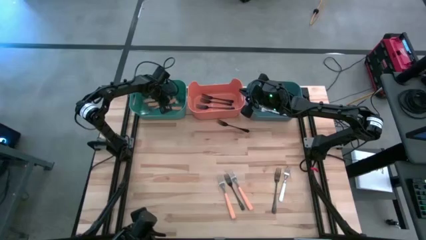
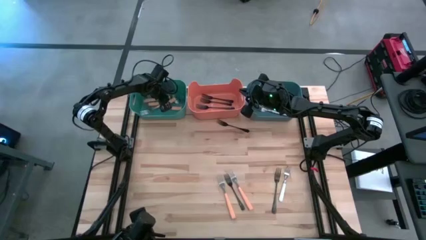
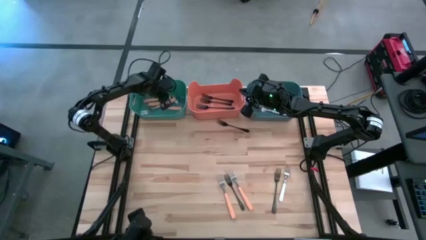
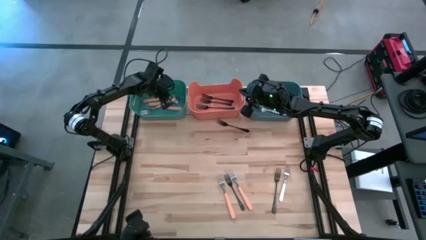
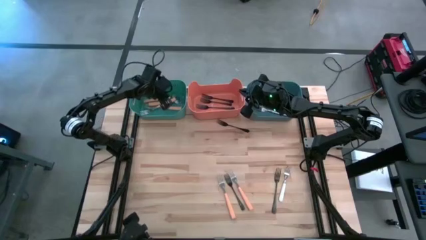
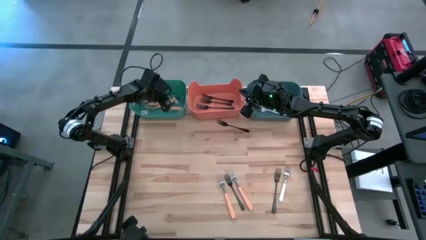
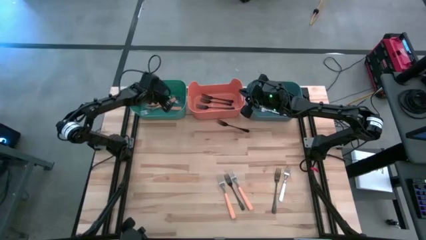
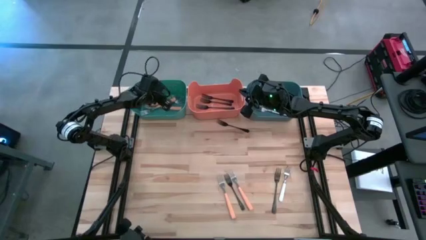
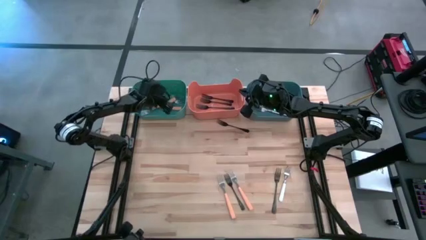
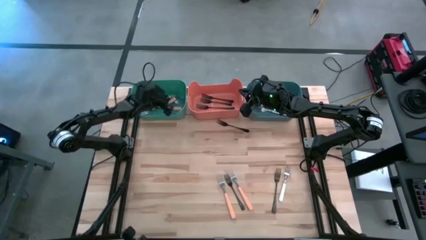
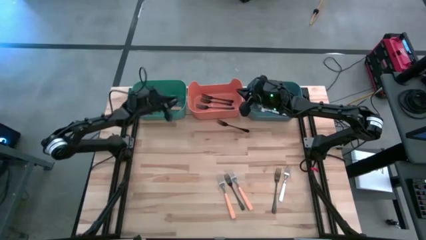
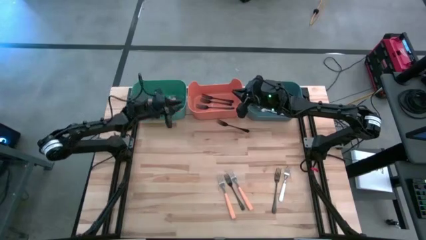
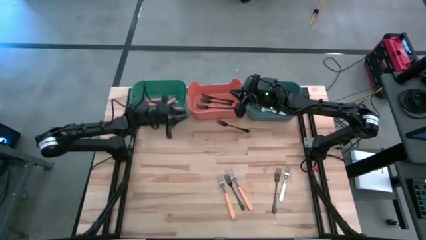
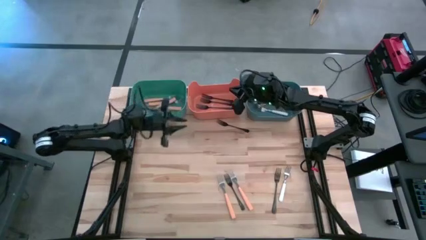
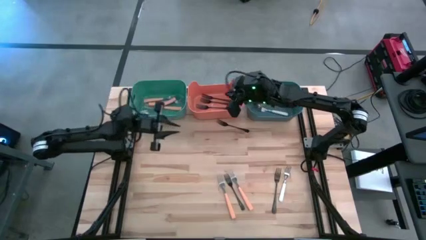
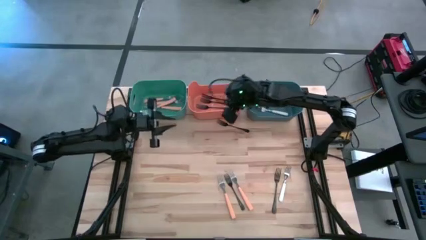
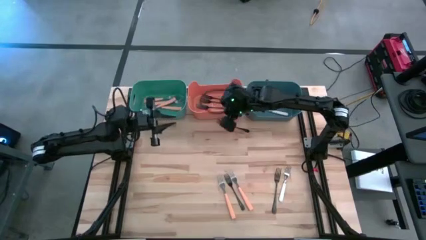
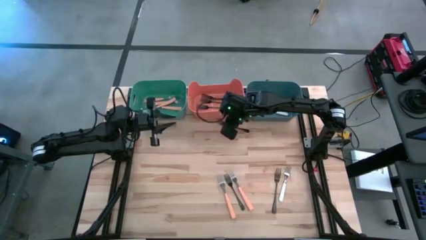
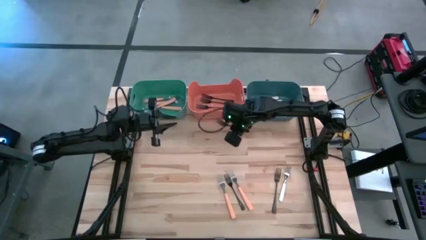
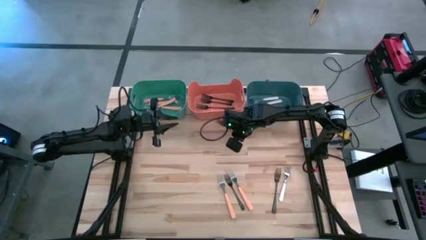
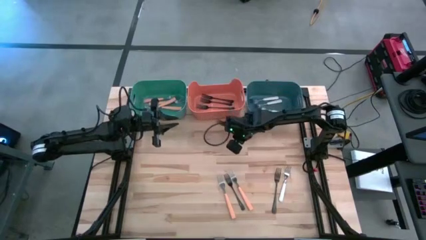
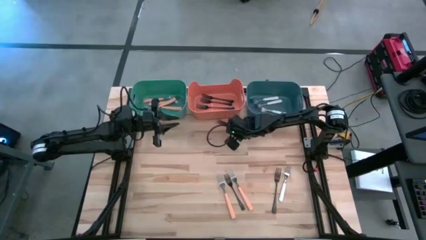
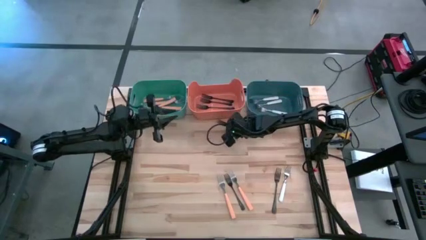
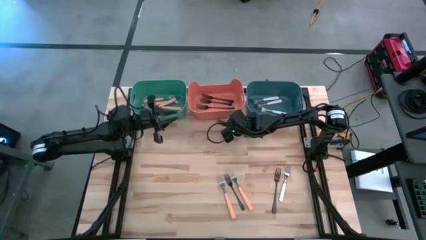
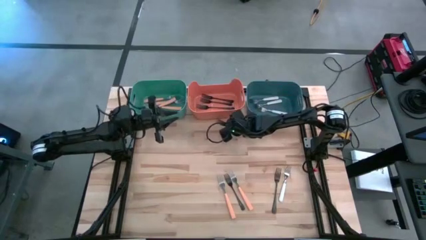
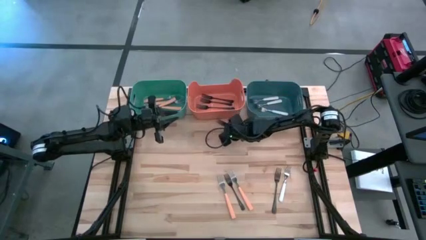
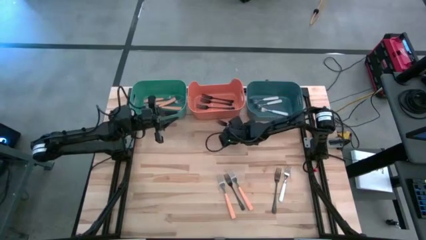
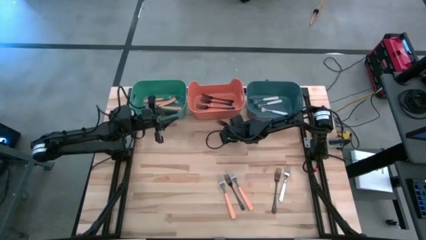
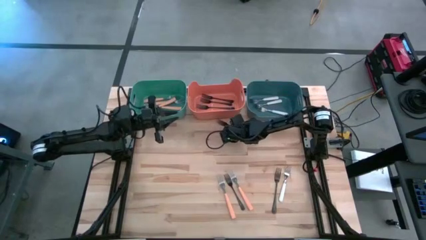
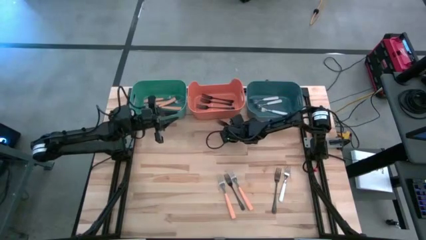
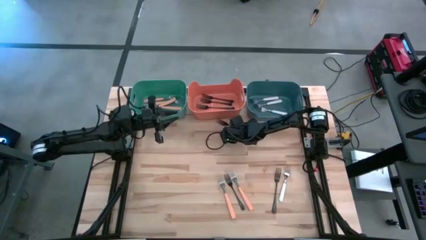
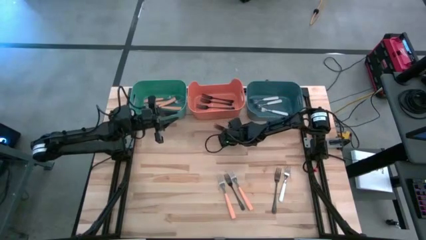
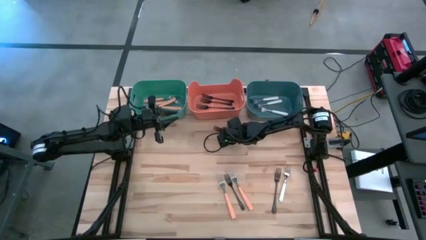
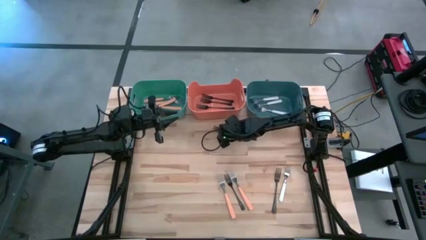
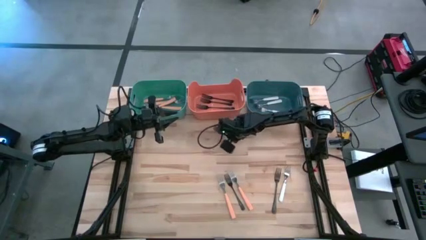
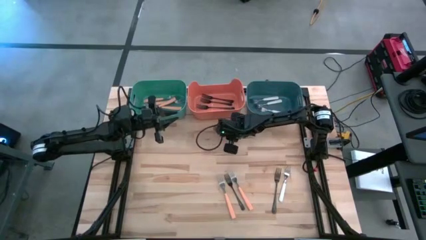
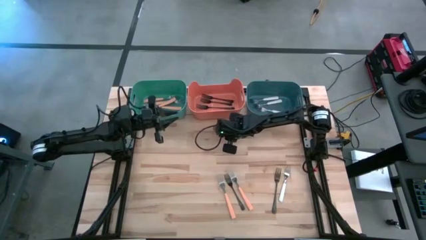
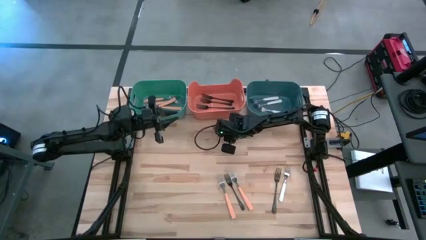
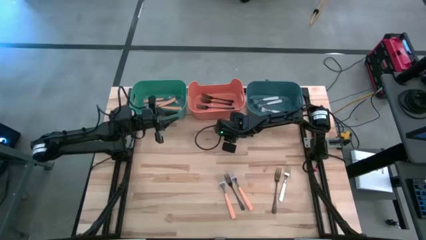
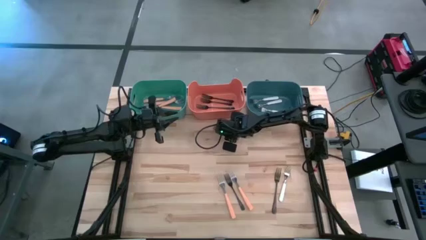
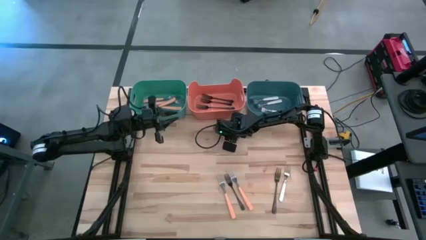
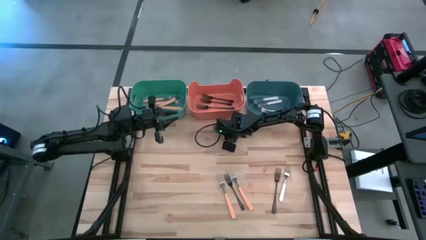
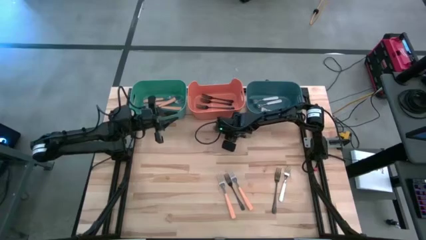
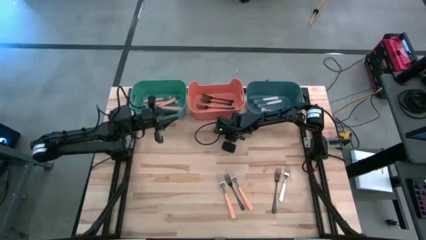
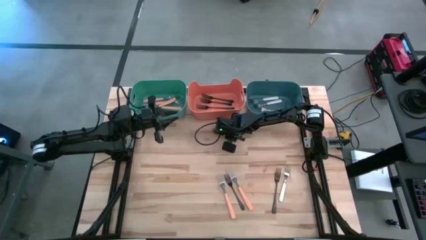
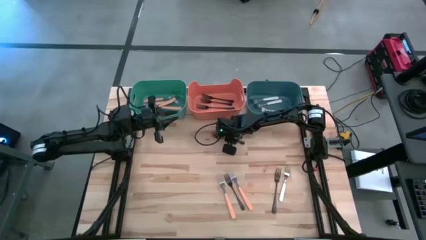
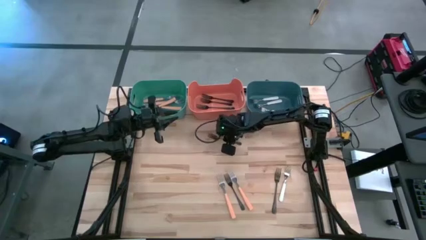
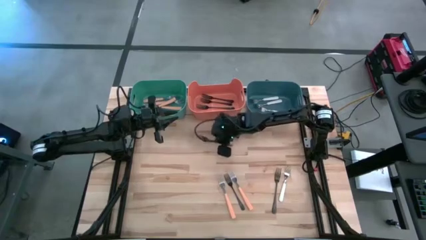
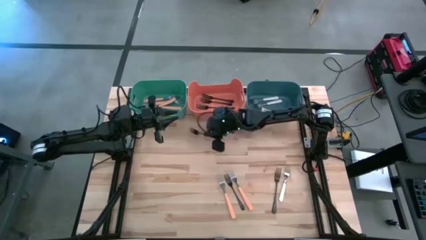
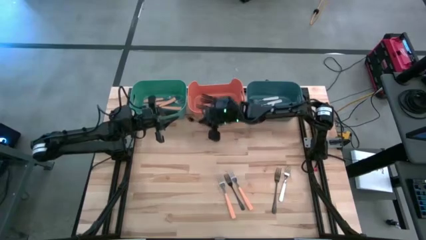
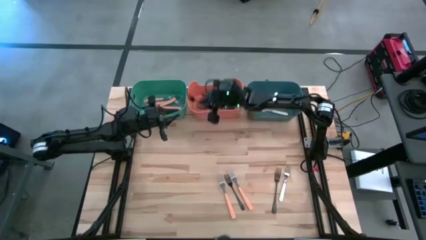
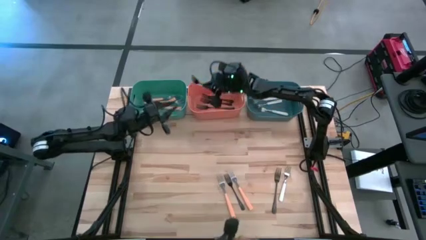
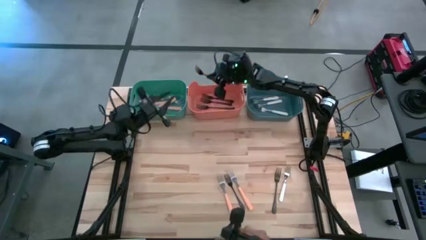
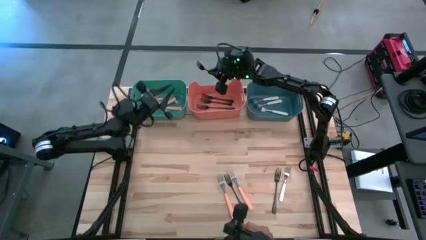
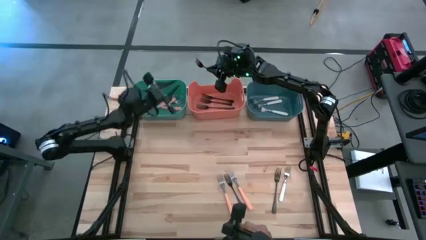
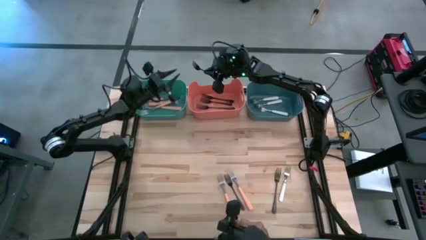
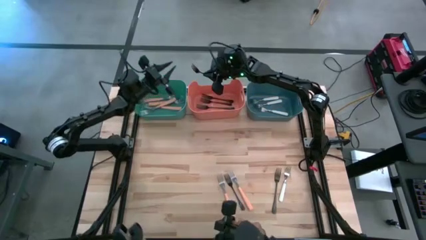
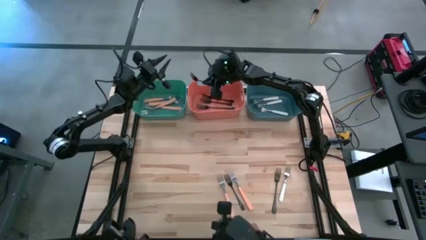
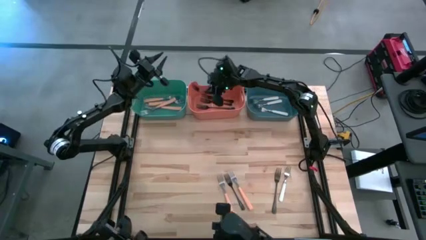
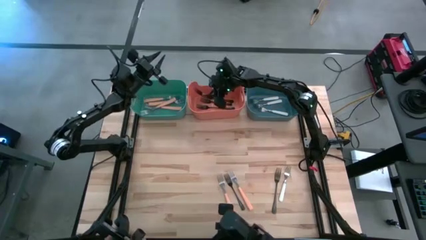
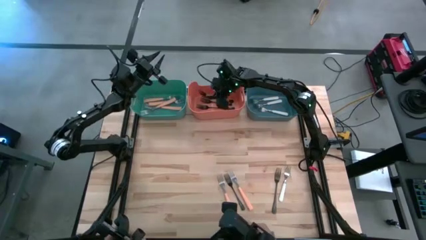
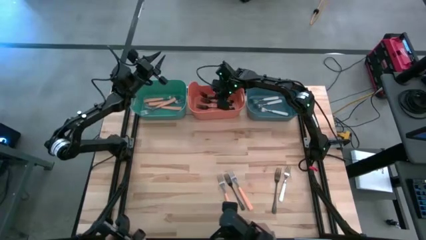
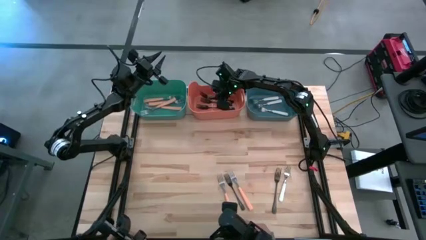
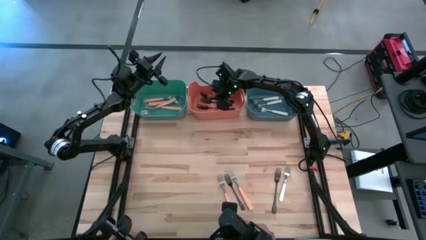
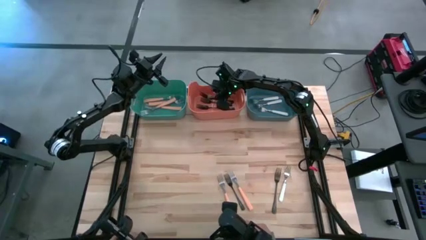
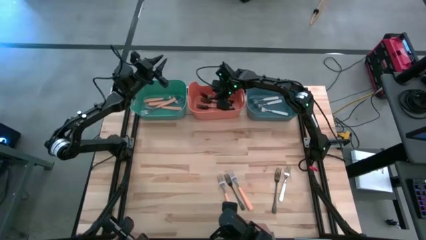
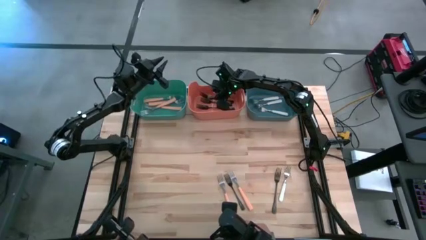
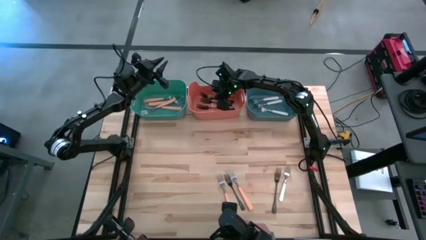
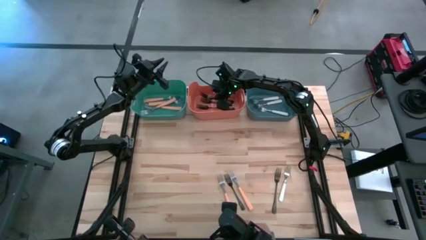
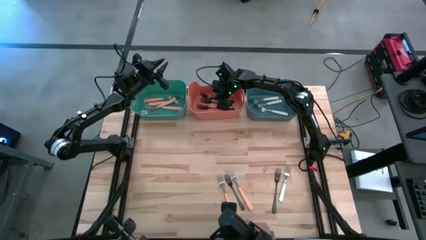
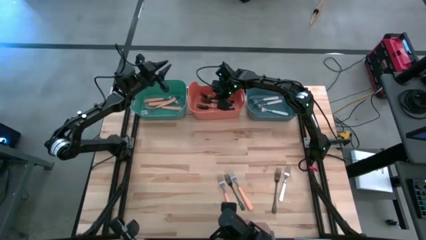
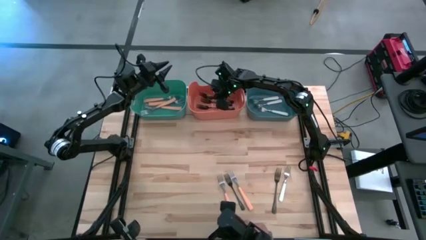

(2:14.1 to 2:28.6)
Task: Sort silverware by color (type)
Put the black fork into the orange bin

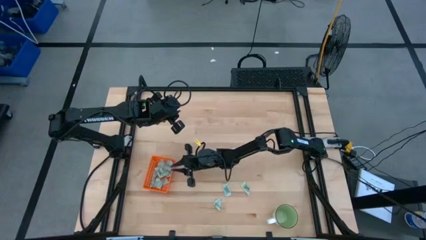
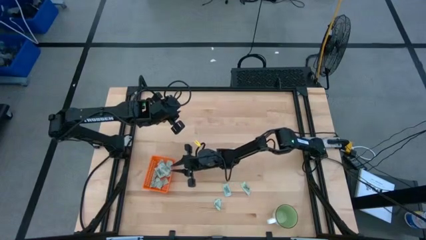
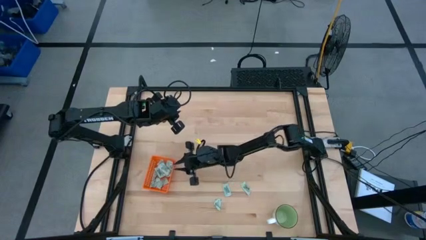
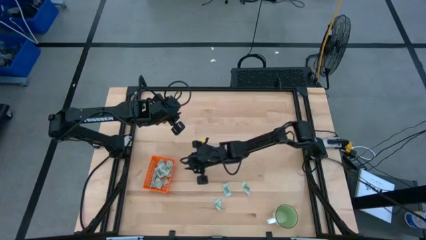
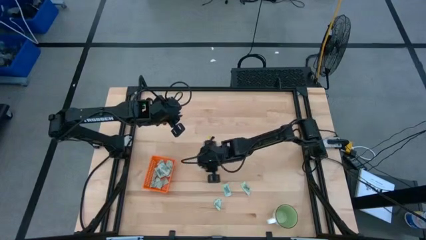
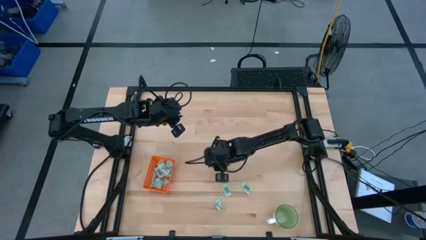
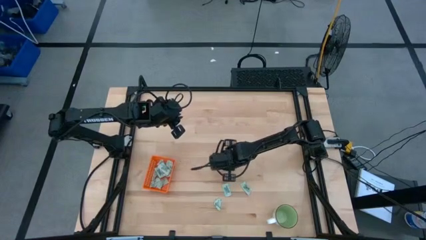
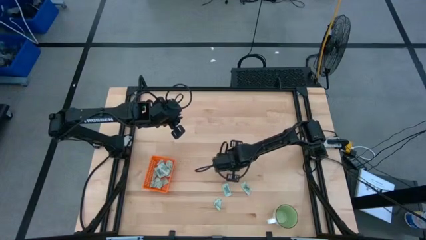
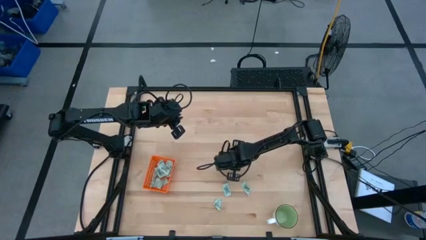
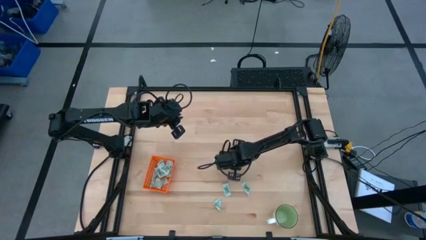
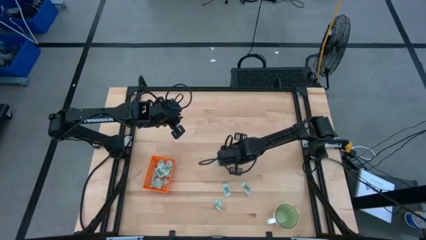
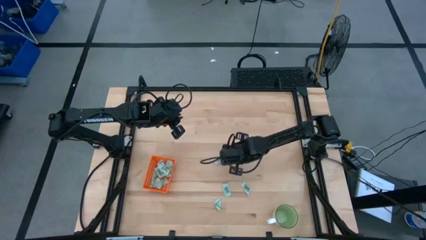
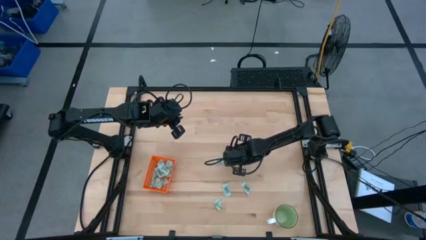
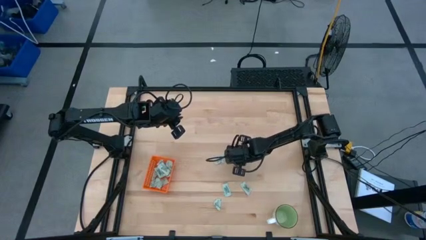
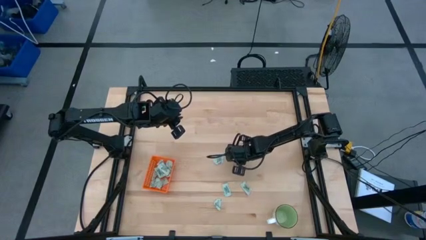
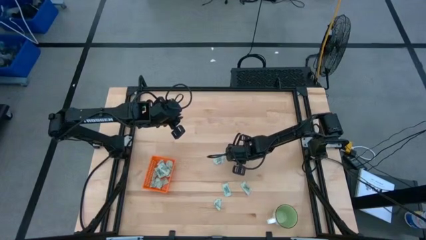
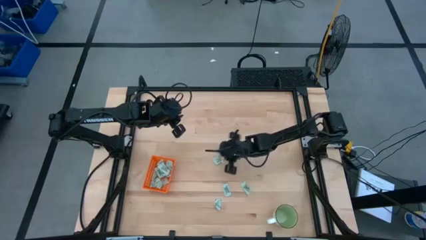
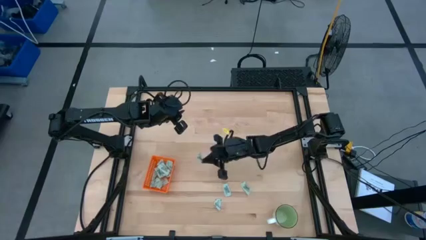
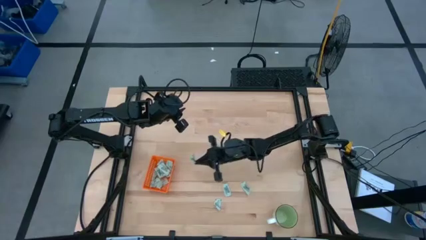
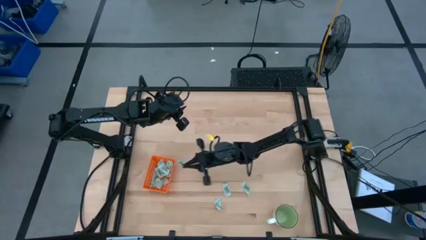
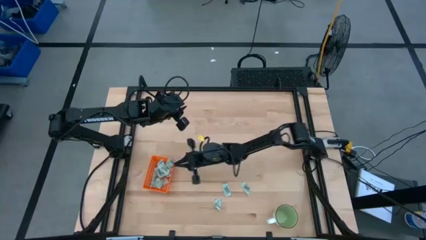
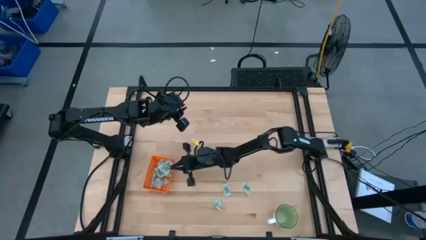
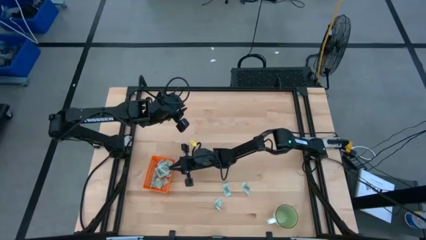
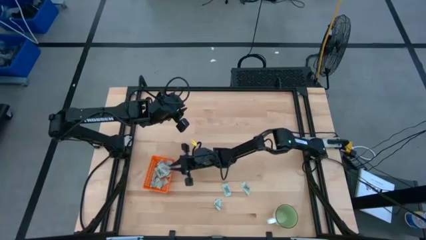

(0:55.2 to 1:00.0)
Task: Pick and place Stevia / Truvia into bins
Put the white stevia packet into the orange bin
